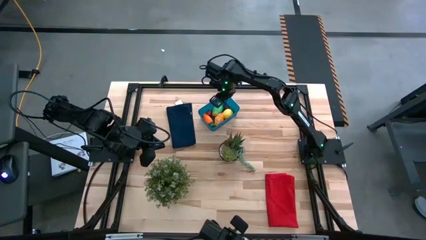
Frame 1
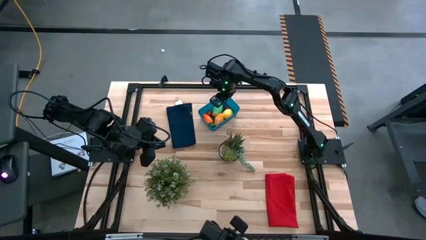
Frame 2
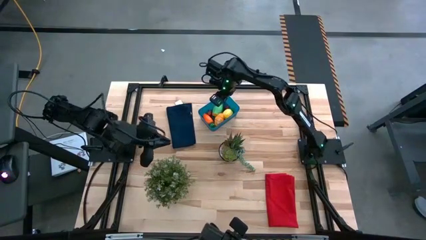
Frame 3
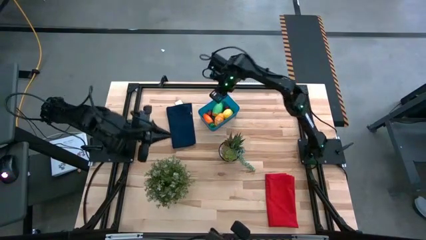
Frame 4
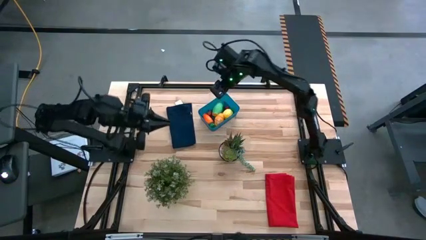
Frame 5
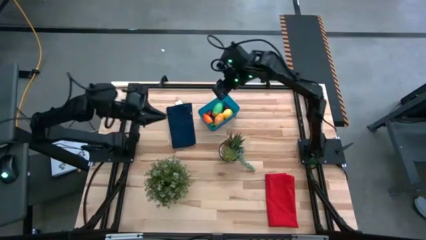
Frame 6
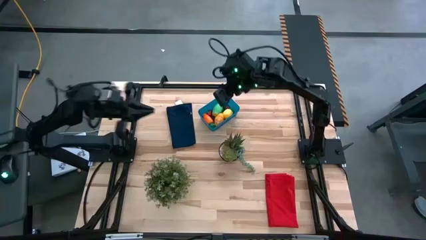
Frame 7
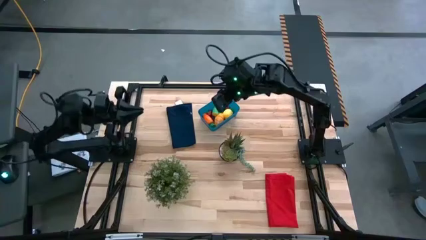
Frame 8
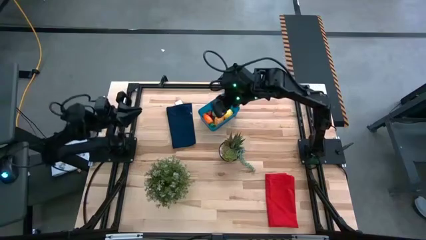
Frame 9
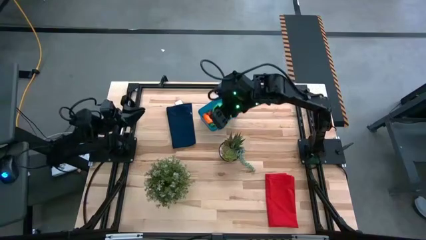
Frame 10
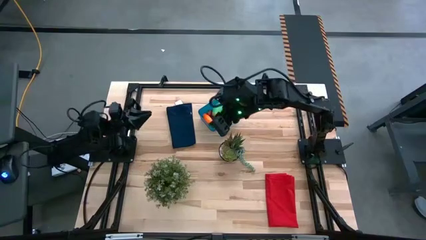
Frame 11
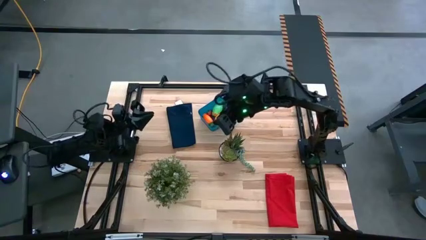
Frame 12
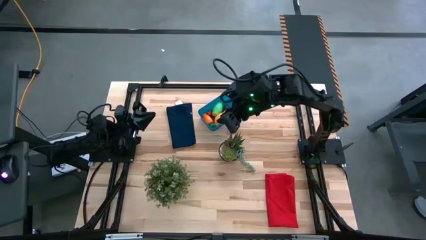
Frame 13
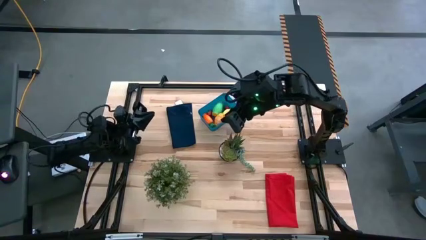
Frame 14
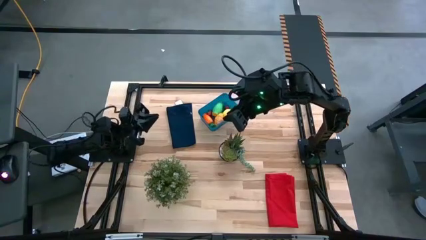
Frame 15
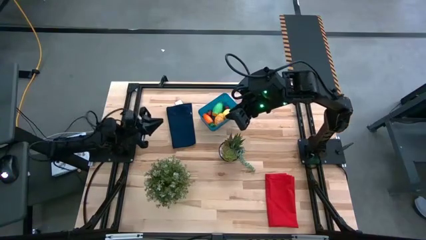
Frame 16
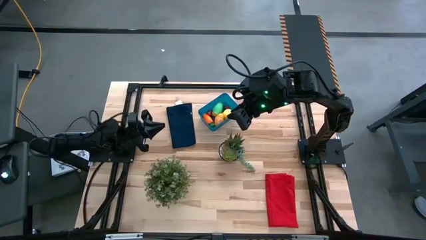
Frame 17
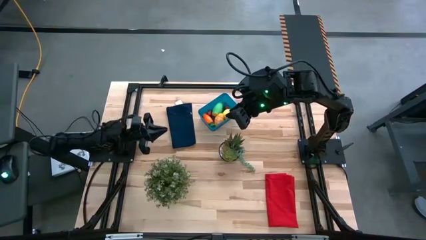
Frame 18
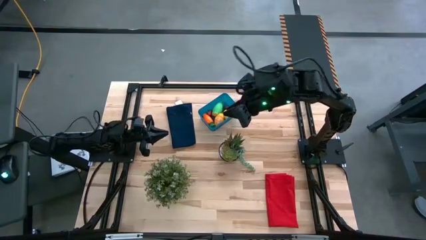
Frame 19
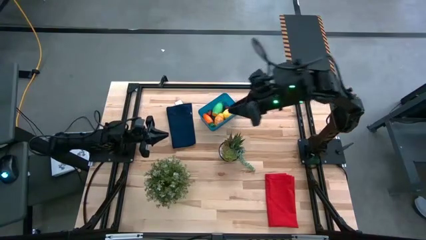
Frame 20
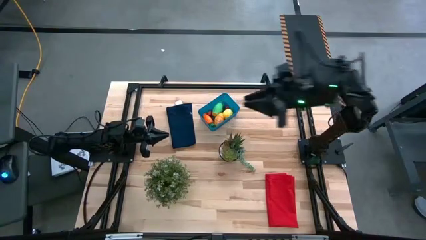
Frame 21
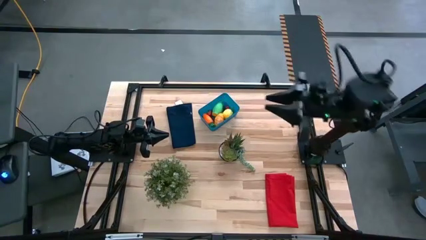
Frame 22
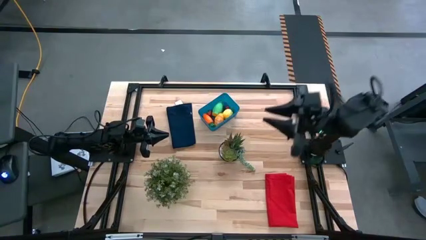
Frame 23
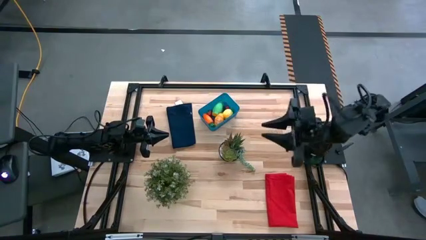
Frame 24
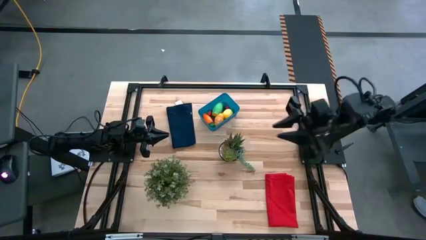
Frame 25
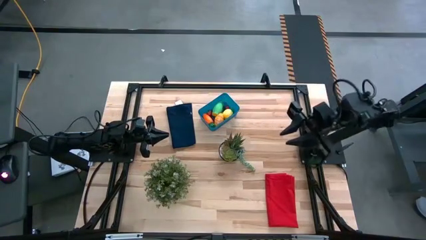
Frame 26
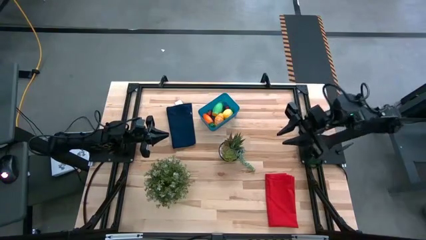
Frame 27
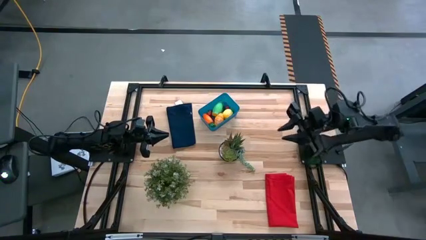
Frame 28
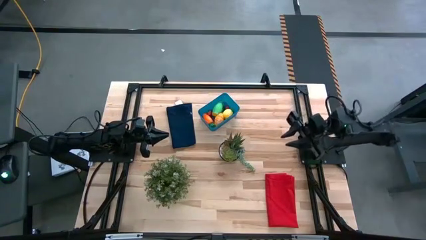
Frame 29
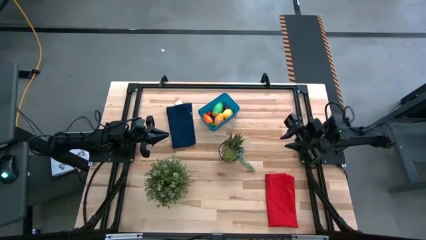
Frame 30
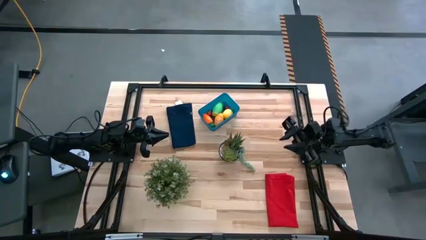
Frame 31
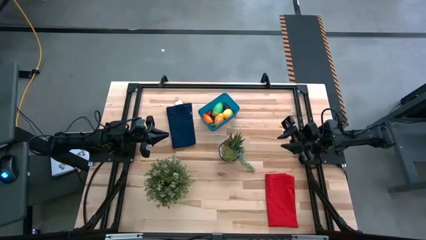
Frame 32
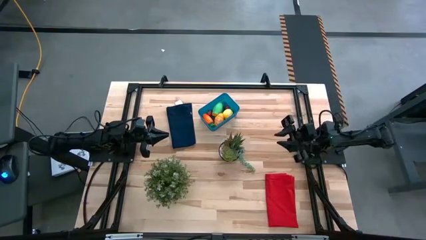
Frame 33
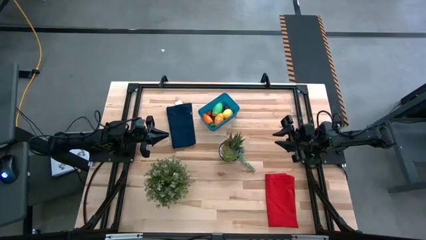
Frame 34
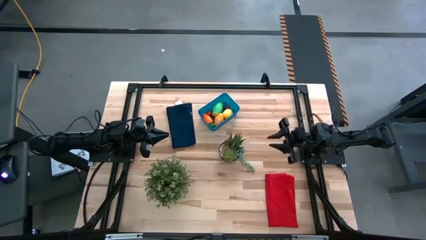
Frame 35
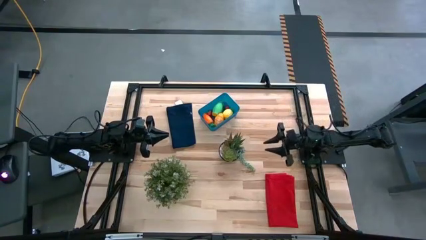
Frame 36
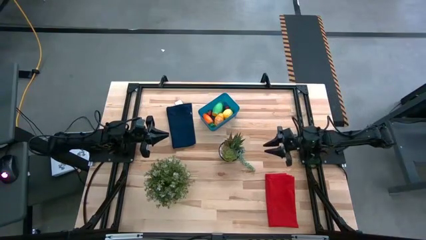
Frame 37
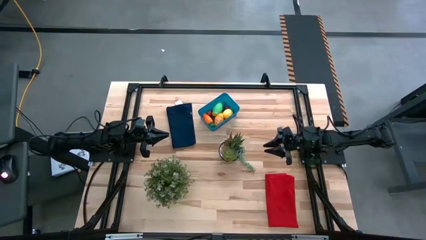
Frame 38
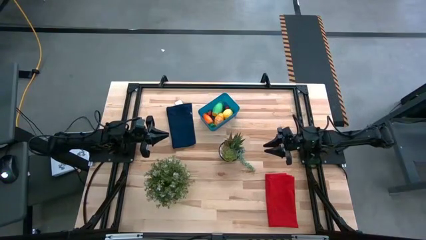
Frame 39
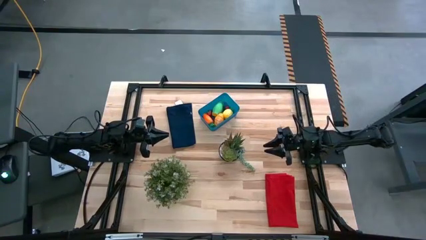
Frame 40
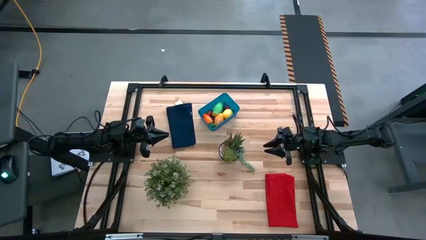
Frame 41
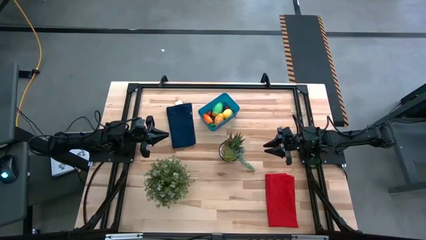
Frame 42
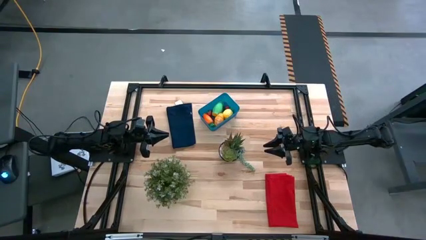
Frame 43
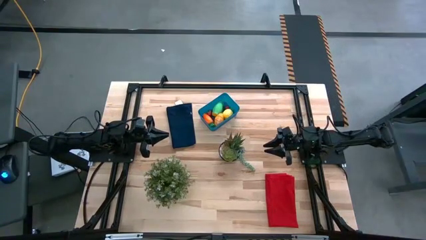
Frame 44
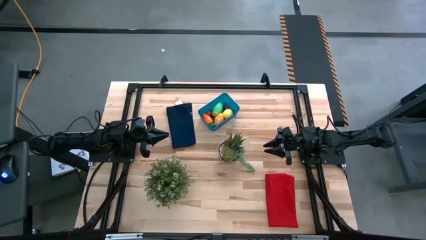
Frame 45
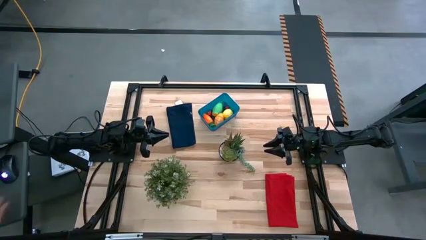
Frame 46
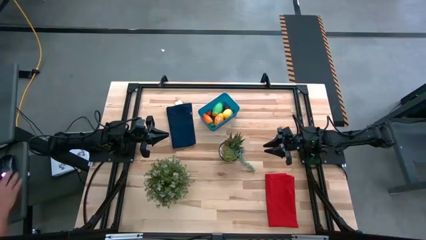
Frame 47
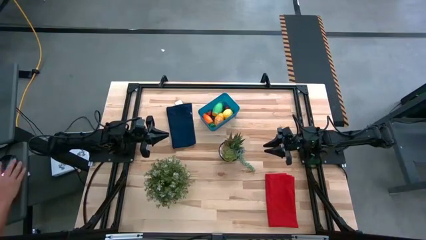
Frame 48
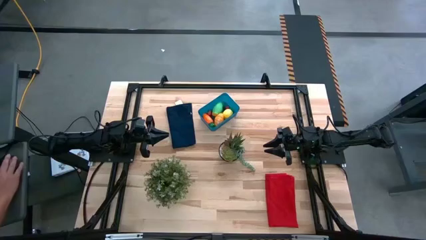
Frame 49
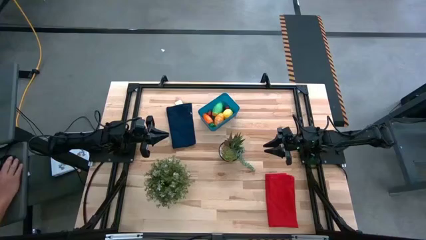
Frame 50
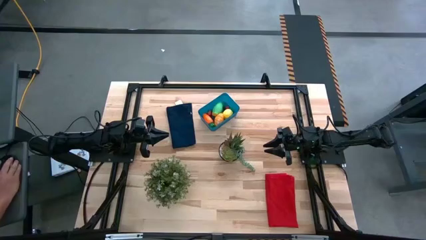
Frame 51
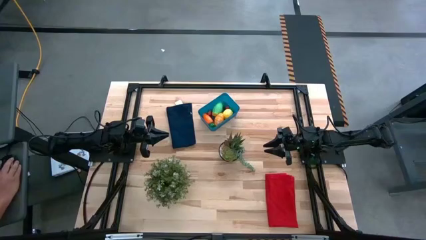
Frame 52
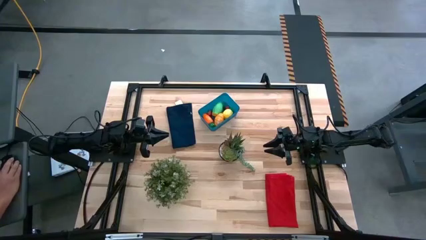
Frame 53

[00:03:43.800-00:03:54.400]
Task: Pick and placing Produce into tupperware
Return to Home Position

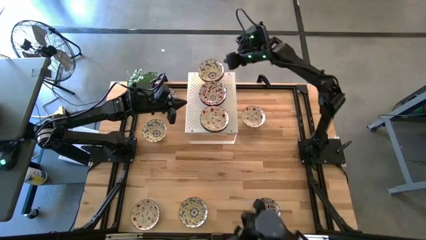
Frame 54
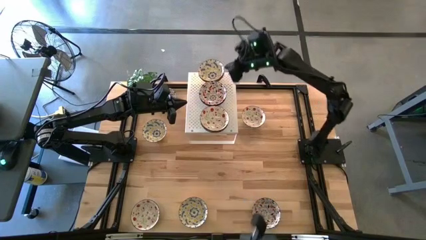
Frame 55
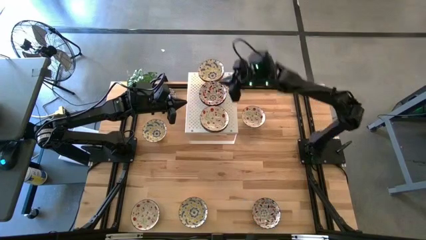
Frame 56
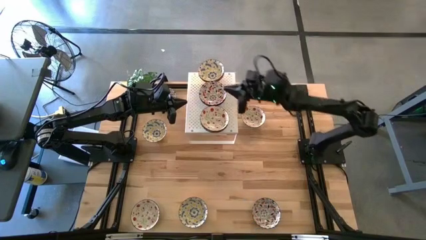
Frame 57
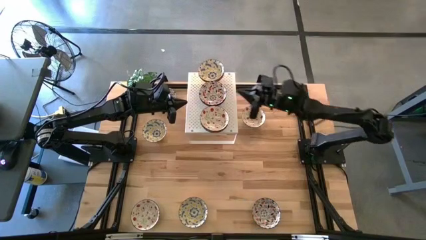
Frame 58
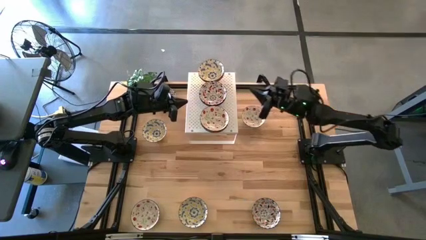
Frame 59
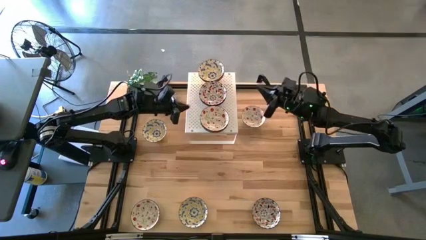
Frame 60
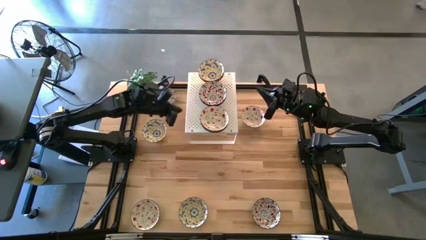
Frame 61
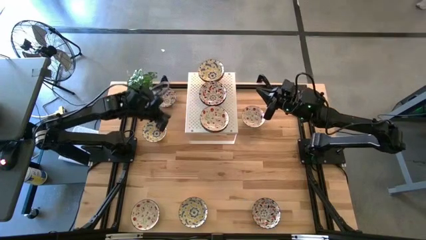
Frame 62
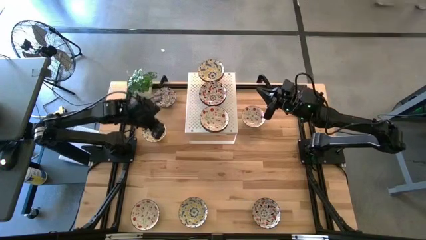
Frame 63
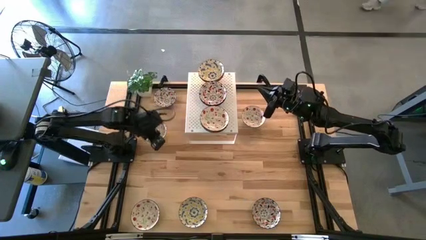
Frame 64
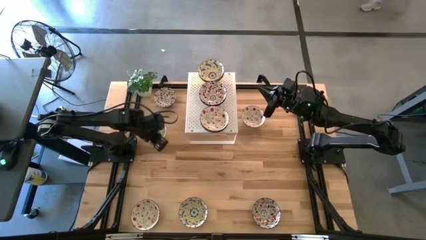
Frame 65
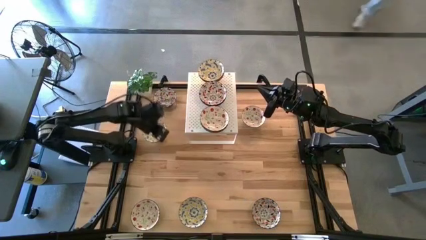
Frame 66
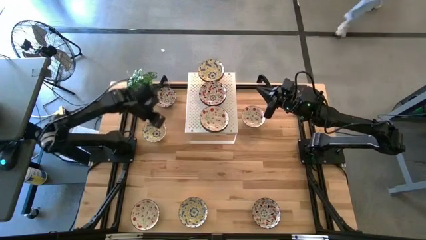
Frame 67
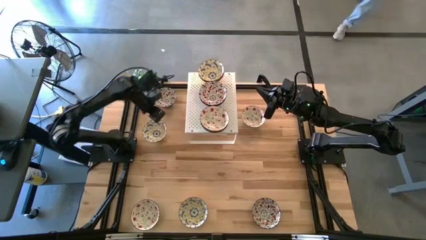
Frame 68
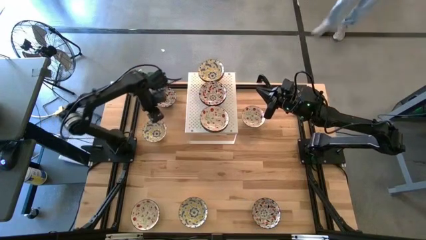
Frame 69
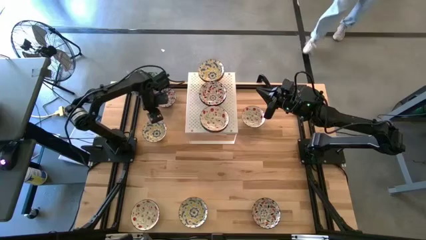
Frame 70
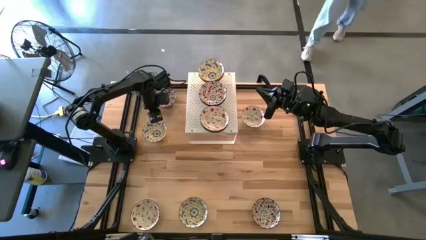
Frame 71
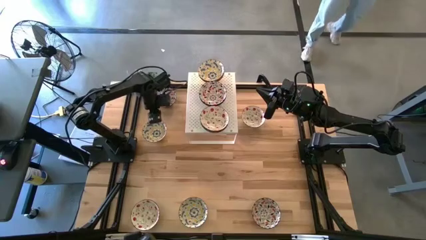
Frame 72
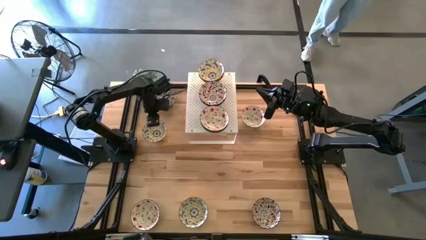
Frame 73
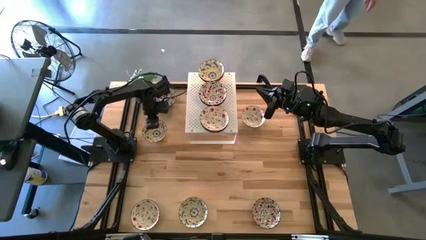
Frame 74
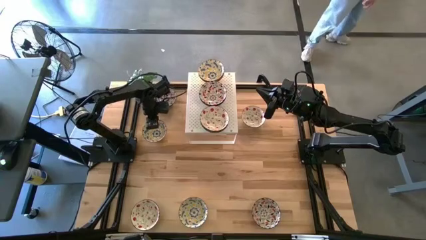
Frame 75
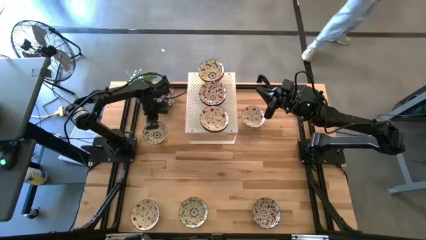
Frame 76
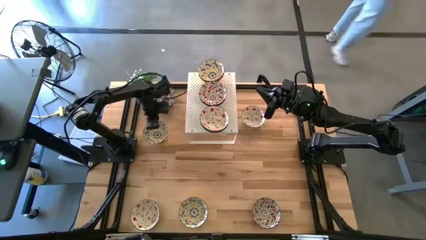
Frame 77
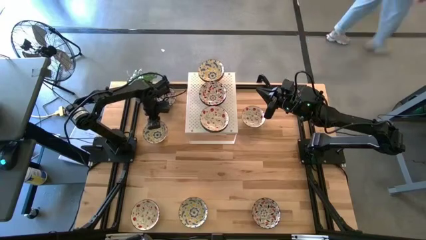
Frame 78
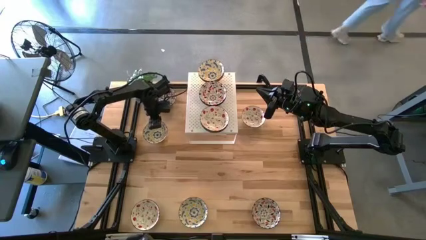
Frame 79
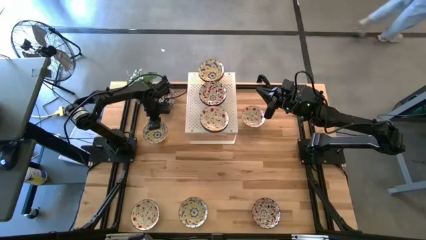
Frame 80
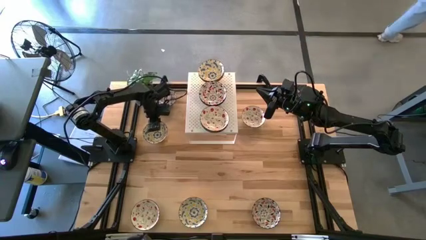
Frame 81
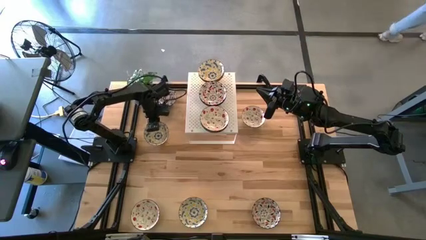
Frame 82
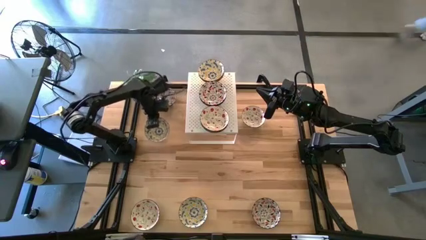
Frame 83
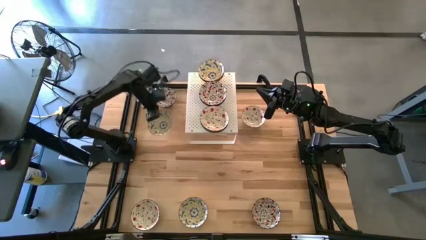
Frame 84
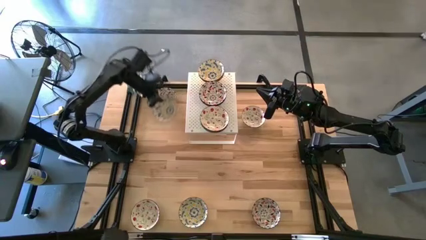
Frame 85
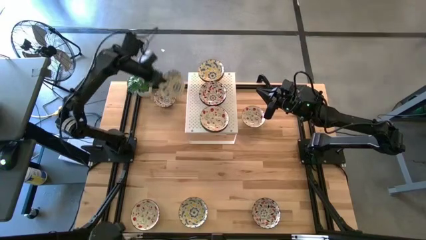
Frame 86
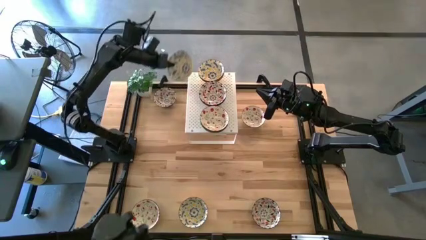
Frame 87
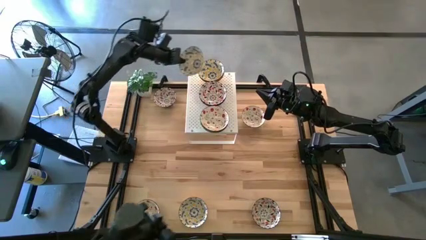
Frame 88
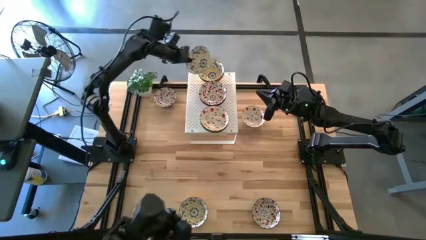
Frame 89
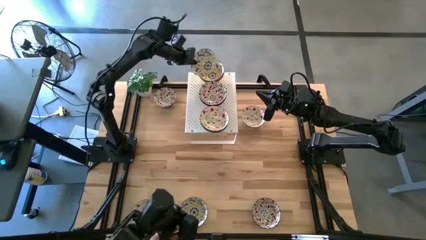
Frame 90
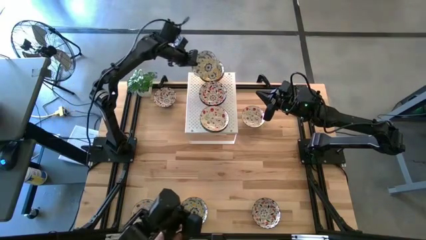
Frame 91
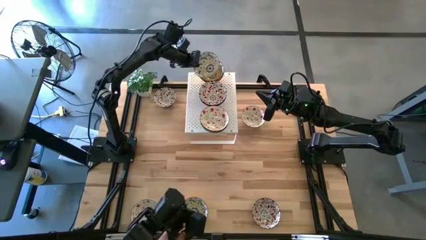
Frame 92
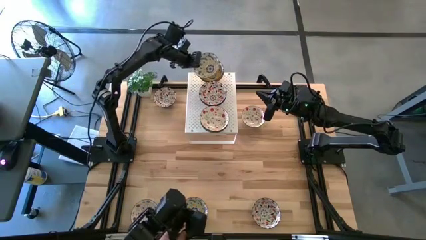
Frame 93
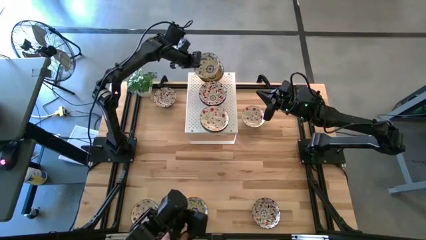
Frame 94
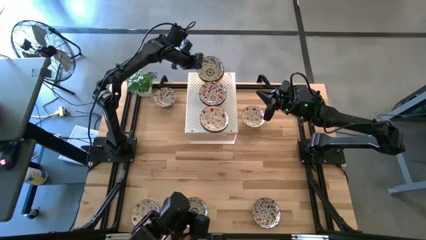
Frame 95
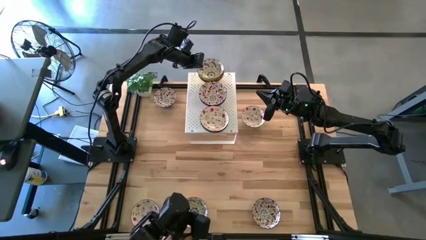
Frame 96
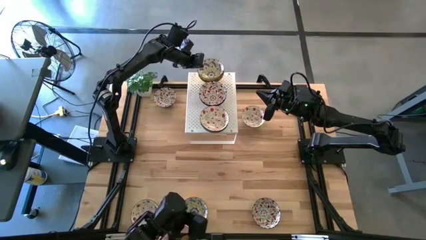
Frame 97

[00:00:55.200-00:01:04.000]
Task: Pick & Place Mini bowls
Stack the yellow patterned bowl on top of the yellow patterned bowl on the shelf
